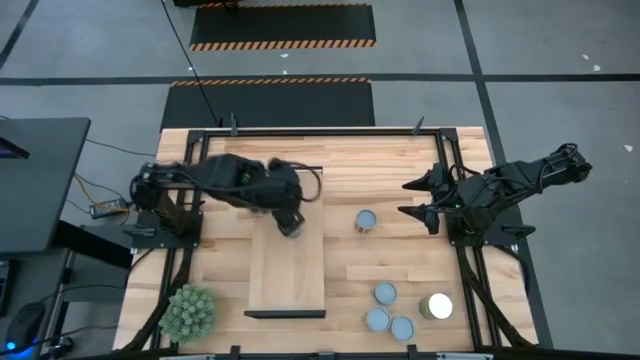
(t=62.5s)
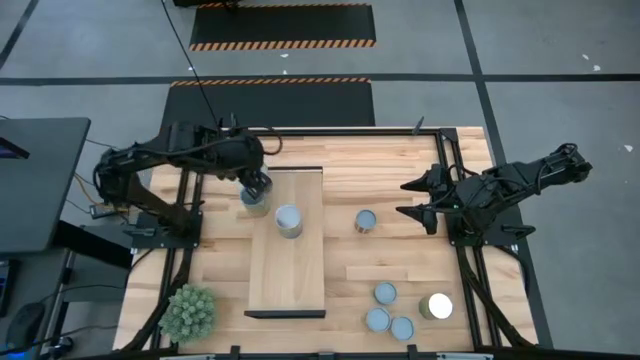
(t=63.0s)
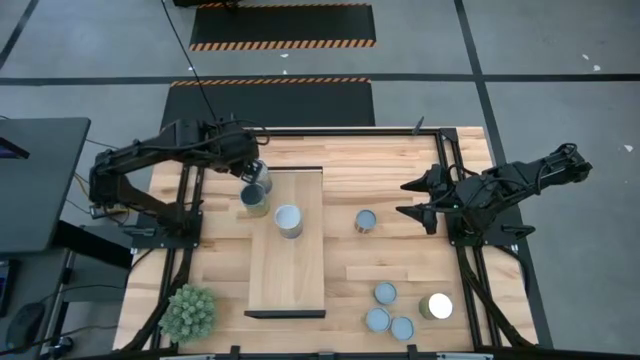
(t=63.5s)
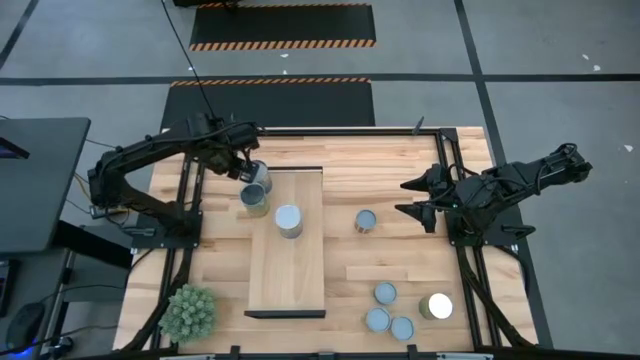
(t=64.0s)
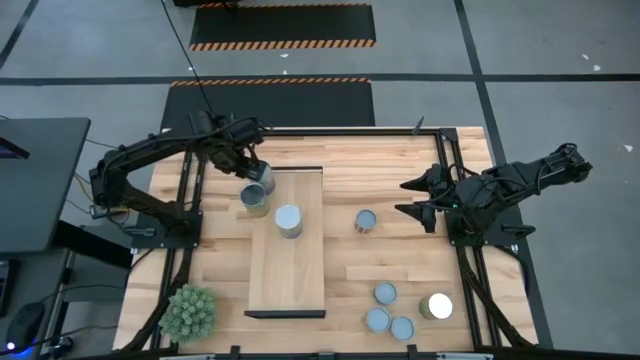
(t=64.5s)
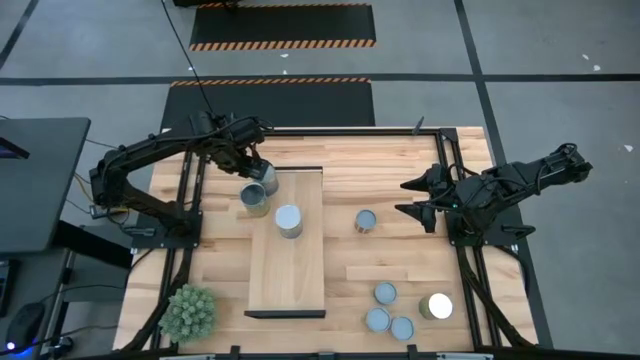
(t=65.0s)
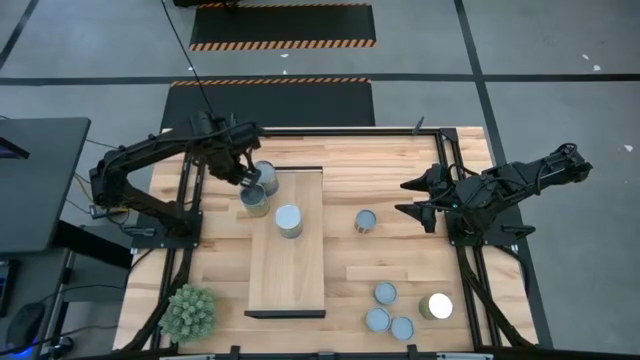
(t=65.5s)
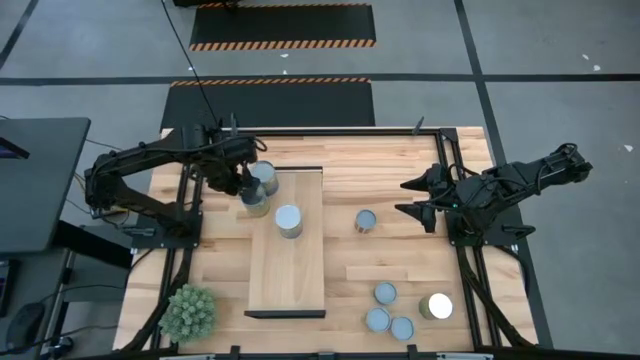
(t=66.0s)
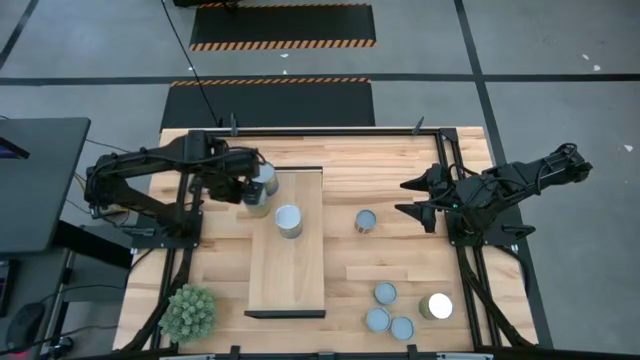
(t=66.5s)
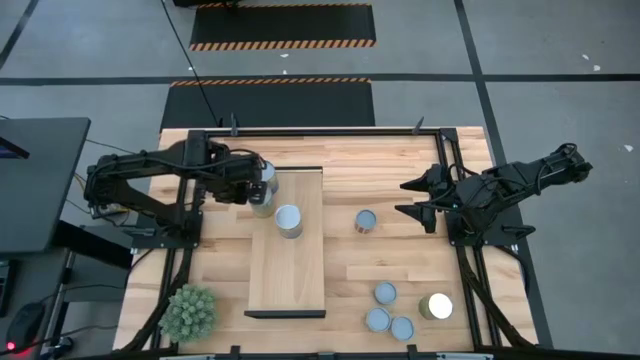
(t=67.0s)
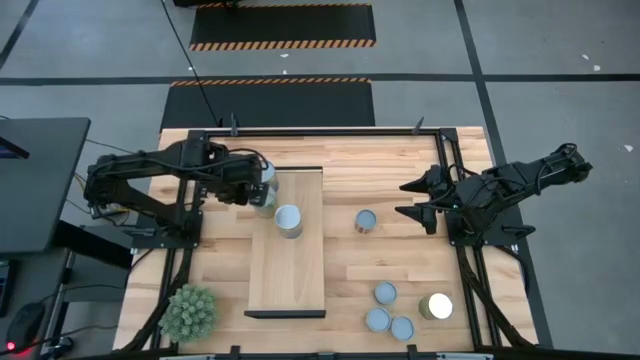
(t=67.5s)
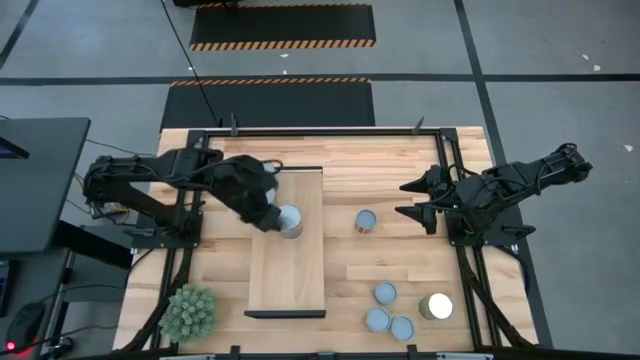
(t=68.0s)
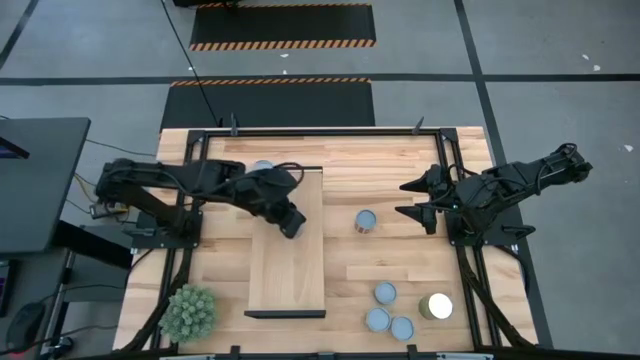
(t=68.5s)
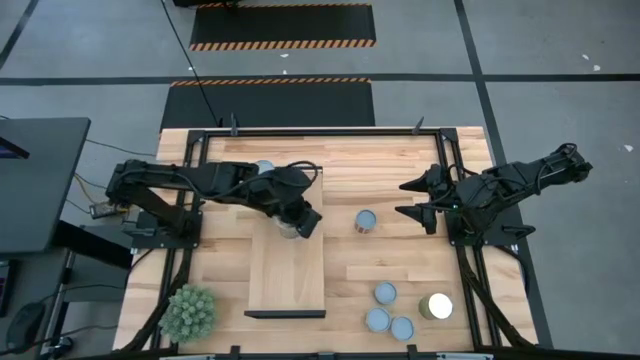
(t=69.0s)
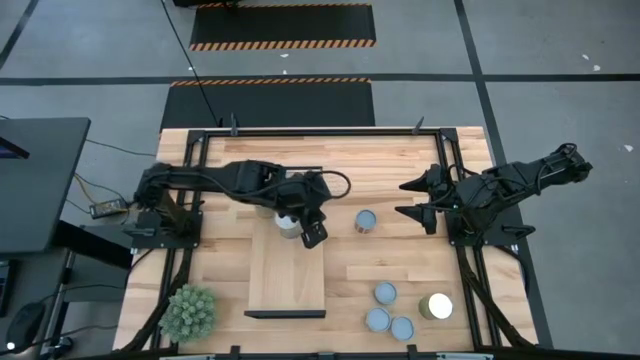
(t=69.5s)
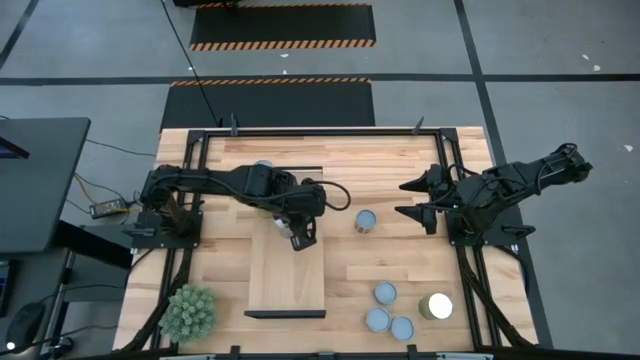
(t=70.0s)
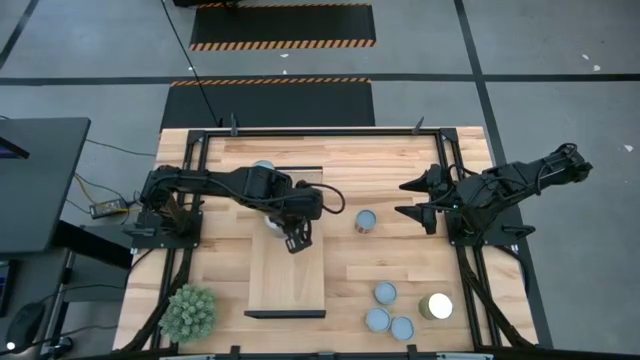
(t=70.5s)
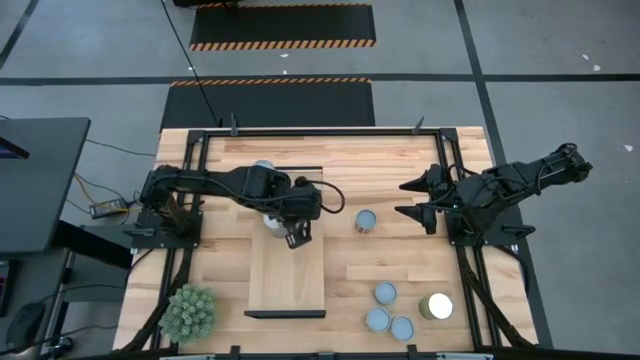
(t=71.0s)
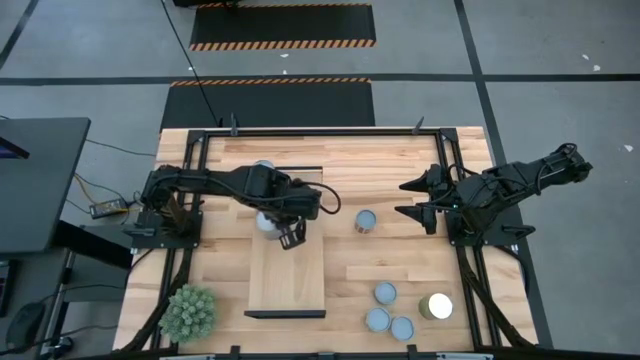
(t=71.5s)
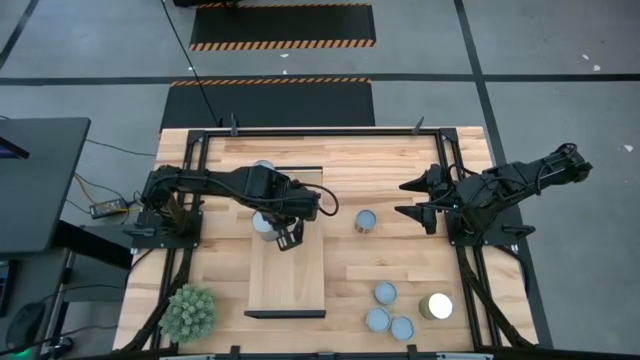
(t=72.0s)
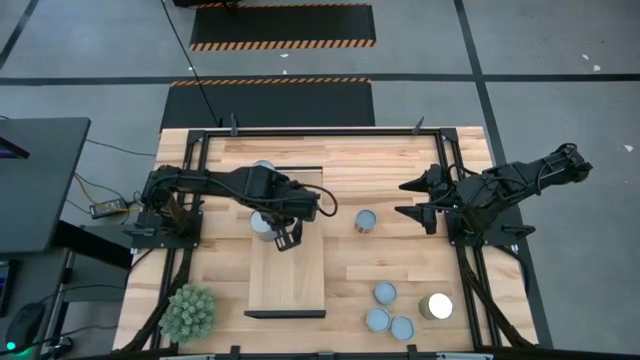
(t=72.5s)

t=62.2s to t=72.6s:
Task: Pick and place cans onto a shelf
Adjust the cans on the shelf

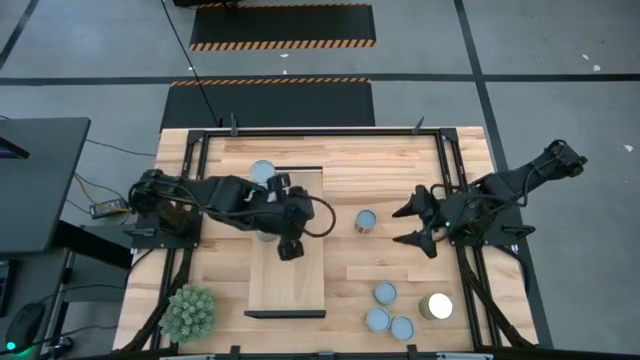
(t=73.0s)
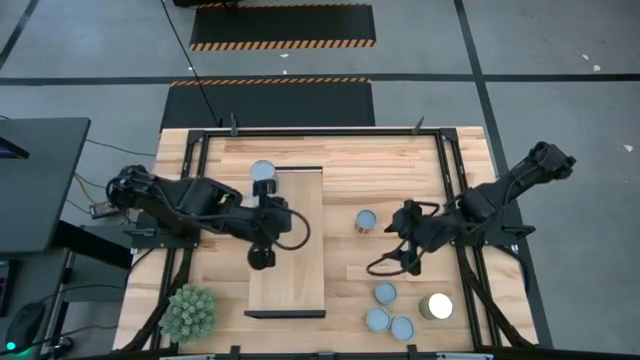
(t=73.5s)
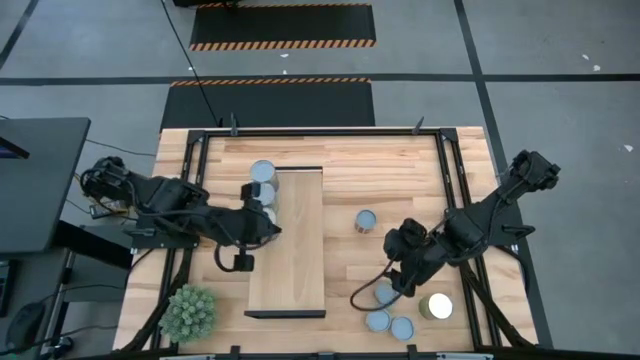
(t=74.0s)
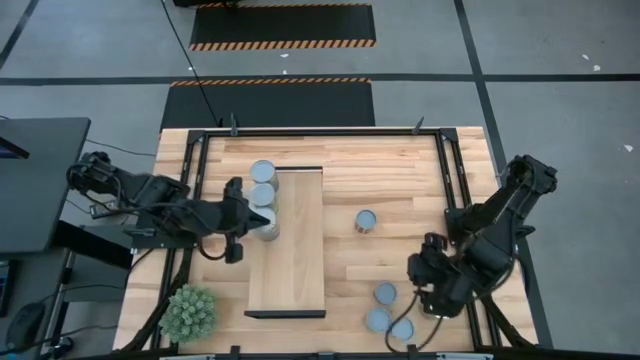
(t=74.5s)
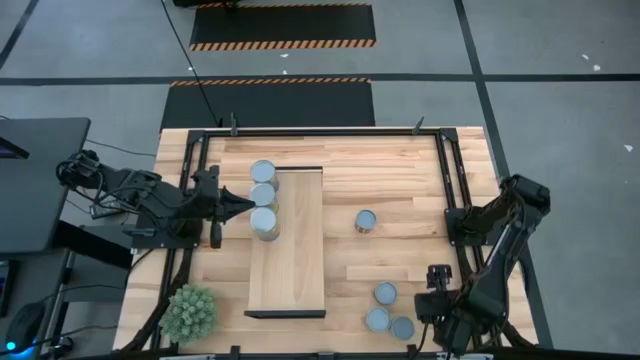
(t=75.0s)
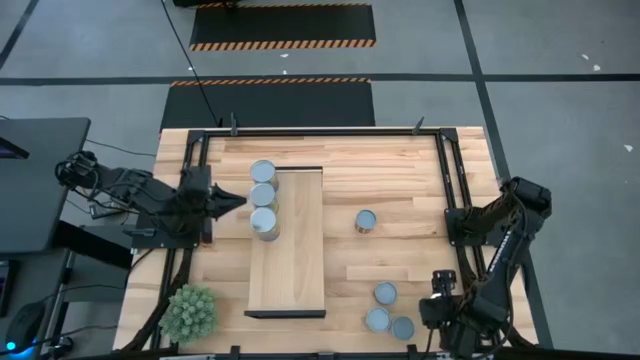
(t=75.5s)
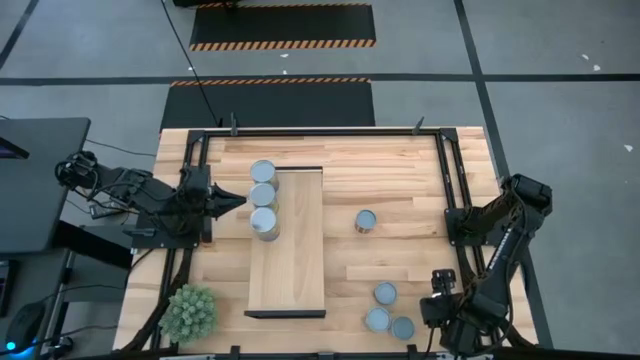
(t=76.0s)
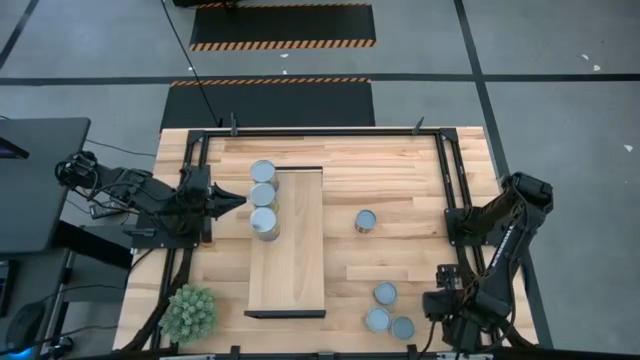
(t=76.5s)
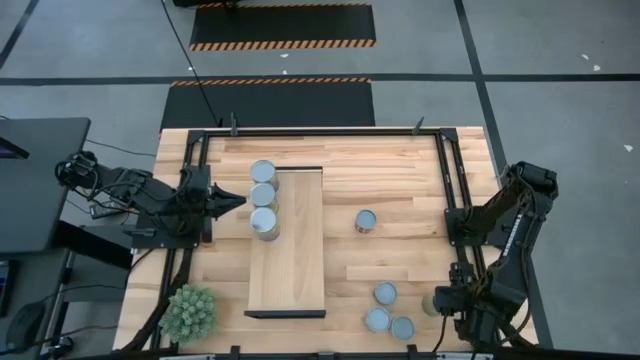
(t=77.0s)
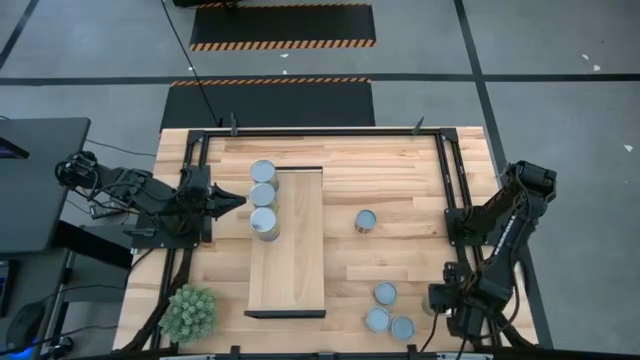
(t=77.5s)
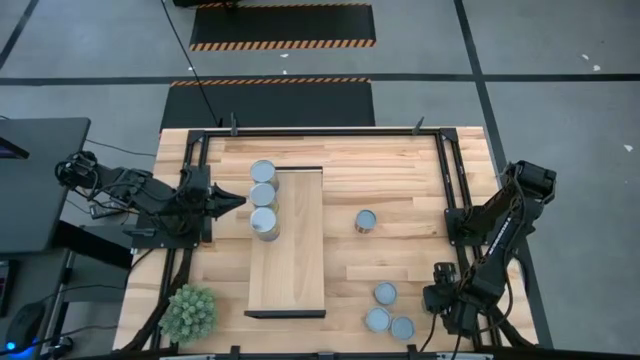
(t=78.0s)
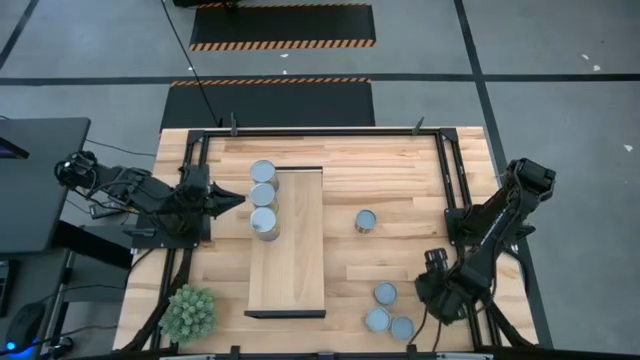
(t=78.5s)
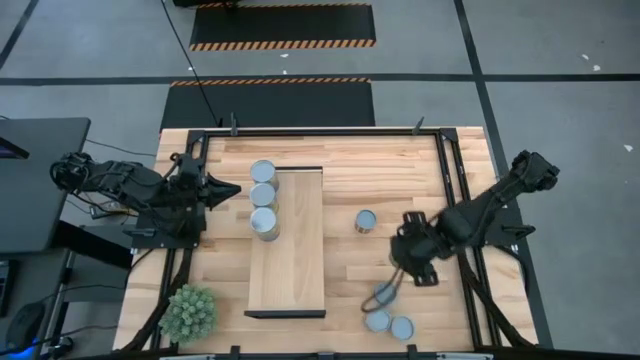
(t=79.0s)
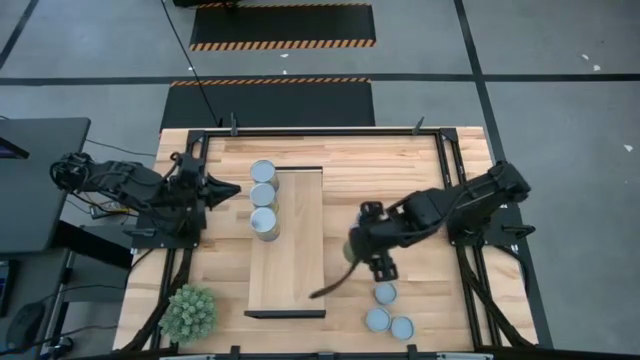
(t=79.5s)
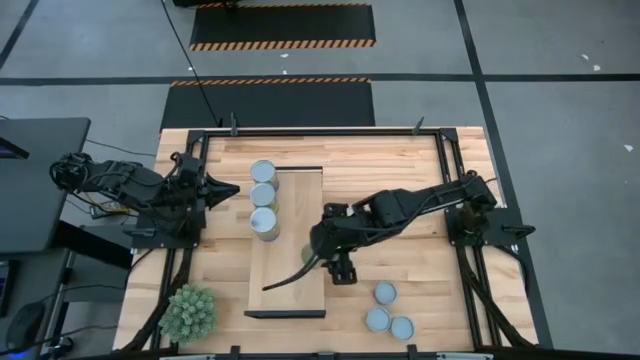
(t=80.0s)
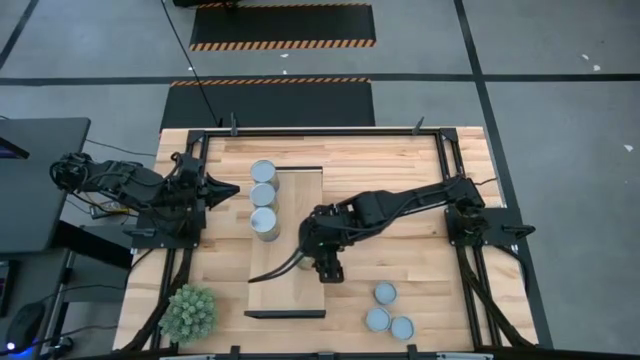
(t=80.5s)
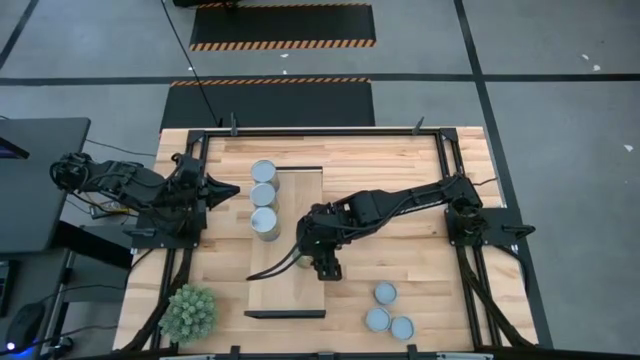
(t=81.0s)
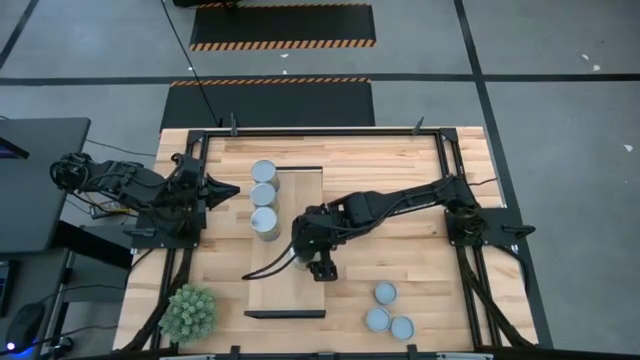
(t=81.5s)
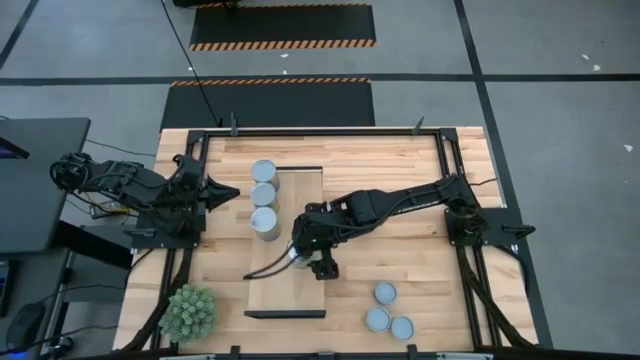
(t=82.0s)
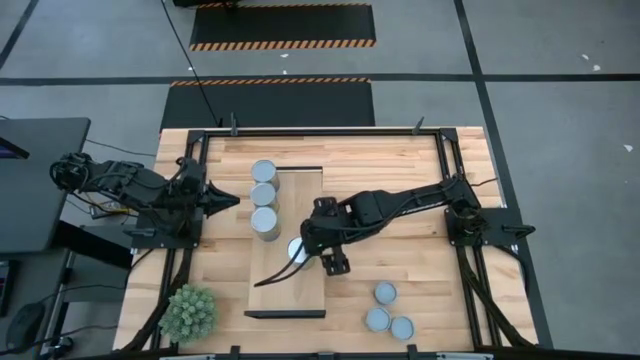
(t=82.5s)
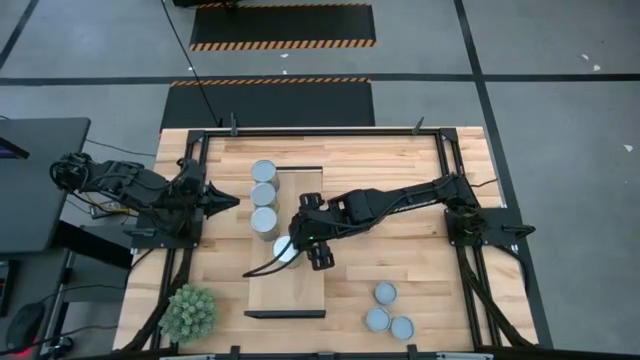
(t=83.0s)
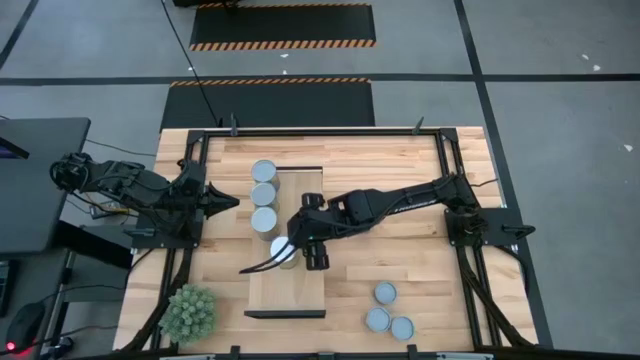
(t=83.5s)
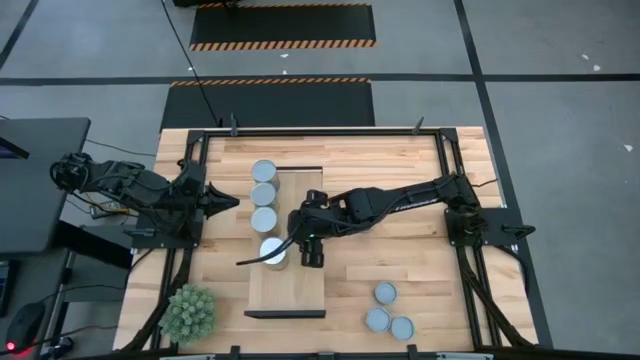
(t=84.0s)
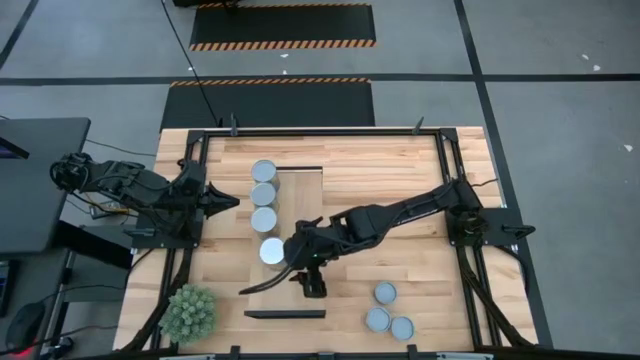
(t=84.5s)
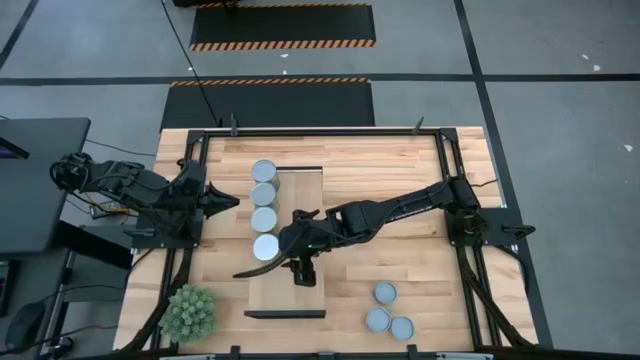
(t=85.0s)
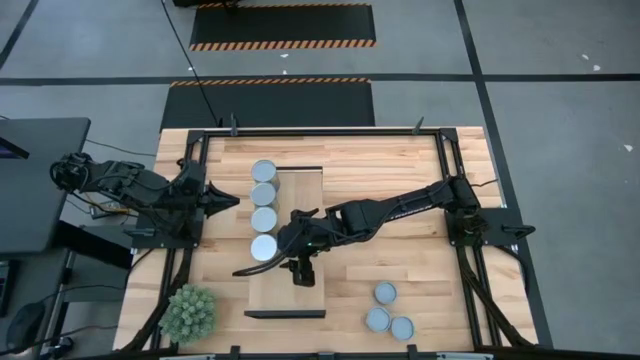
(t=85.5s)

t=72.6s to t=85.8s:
Put the canned oranges on the shelf
